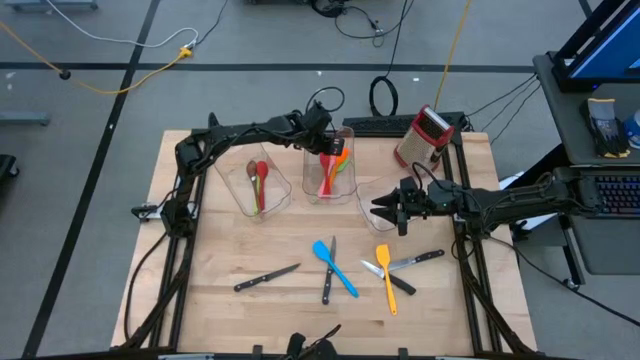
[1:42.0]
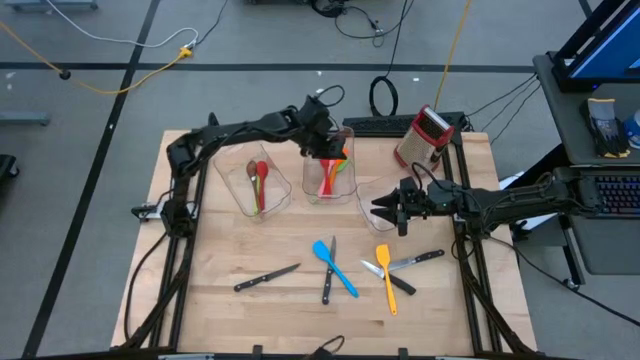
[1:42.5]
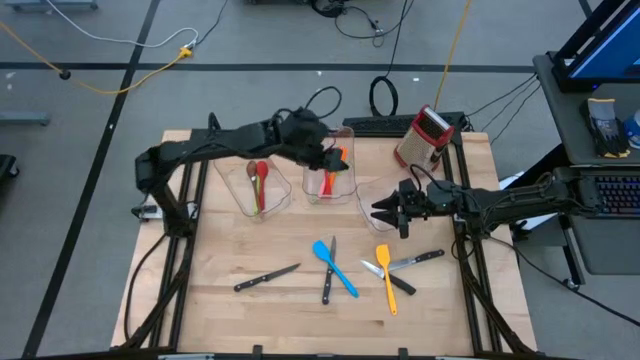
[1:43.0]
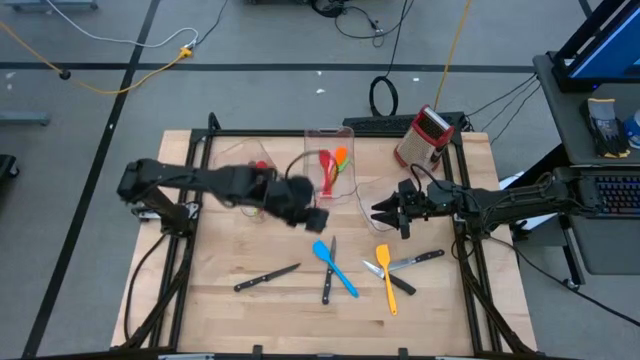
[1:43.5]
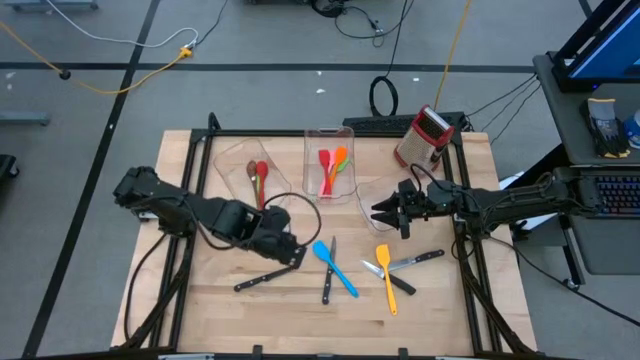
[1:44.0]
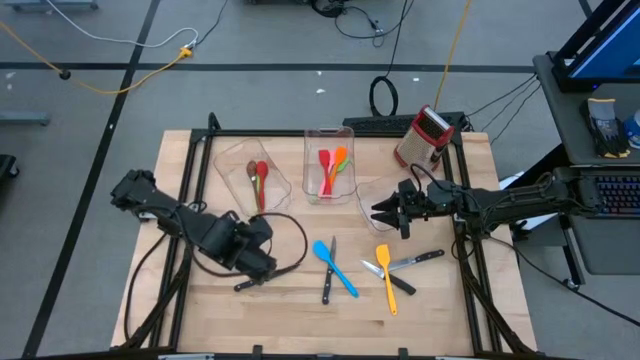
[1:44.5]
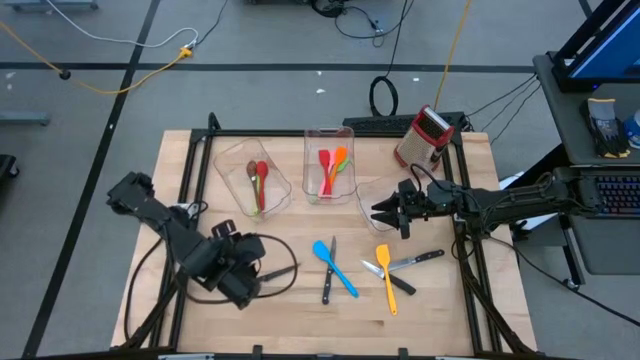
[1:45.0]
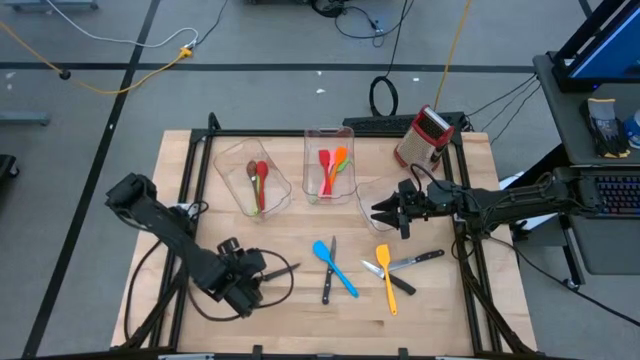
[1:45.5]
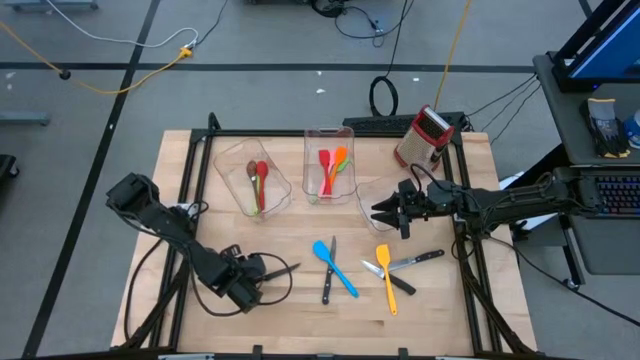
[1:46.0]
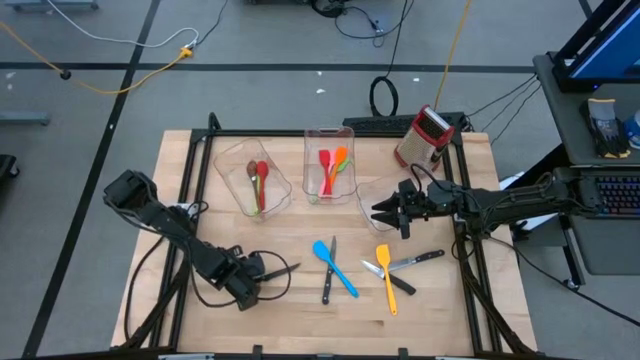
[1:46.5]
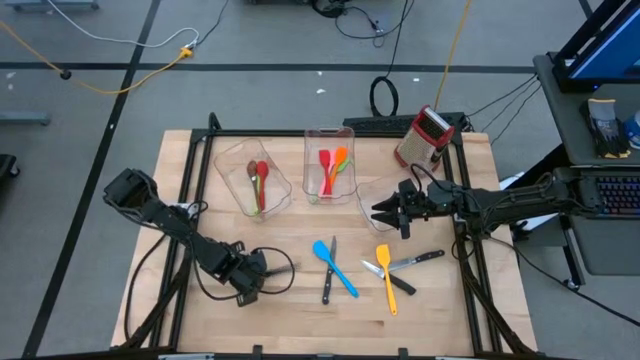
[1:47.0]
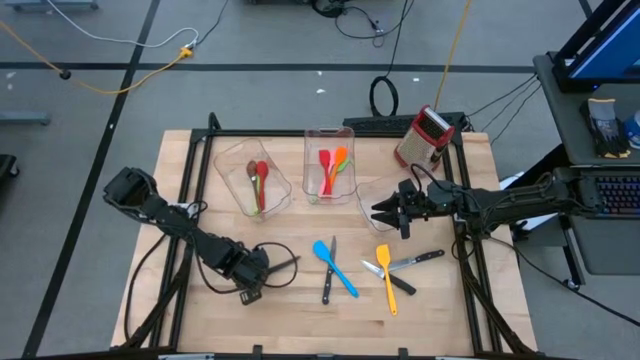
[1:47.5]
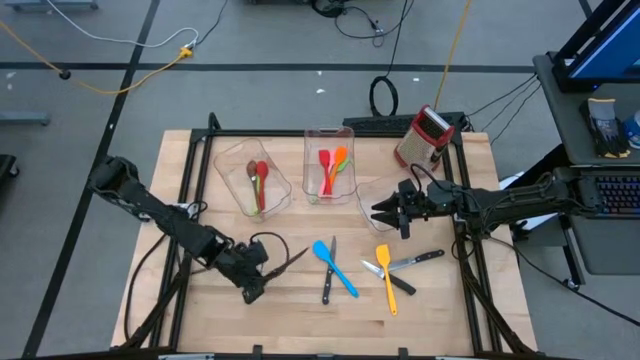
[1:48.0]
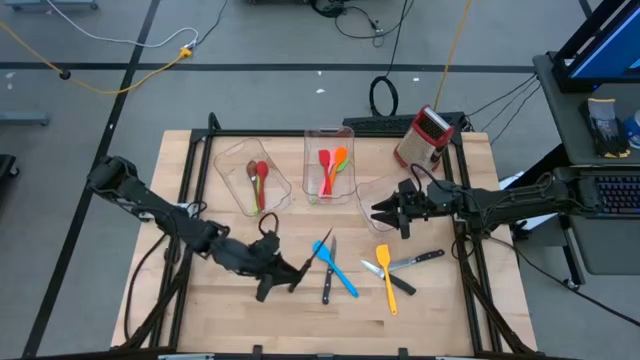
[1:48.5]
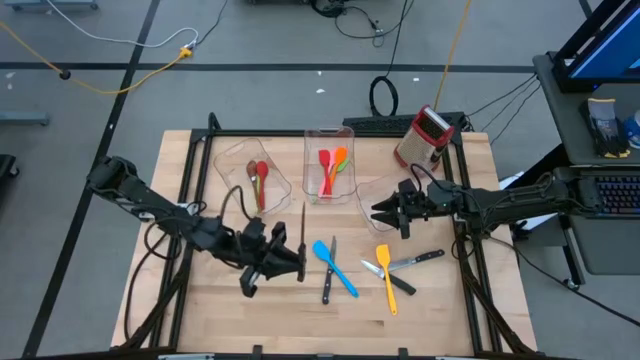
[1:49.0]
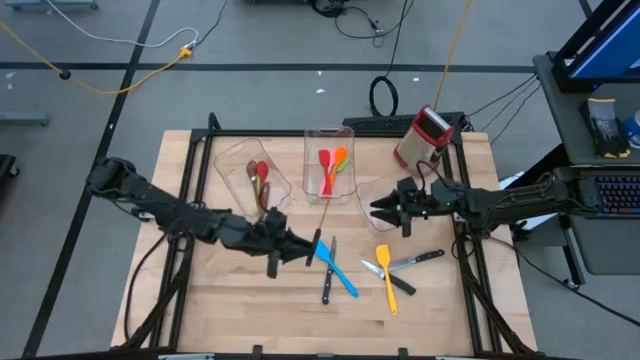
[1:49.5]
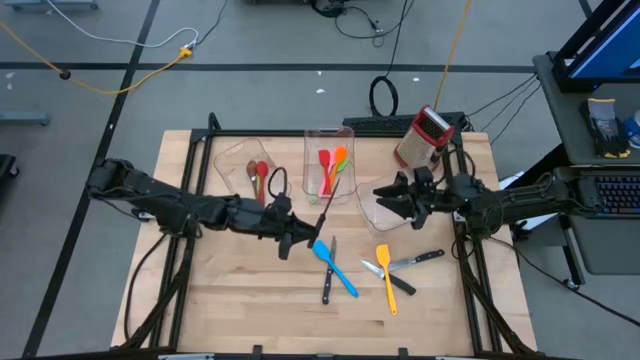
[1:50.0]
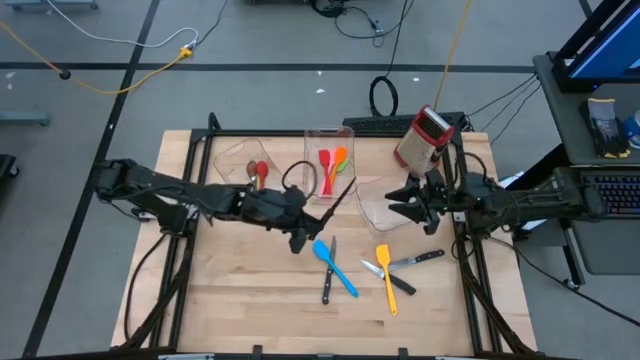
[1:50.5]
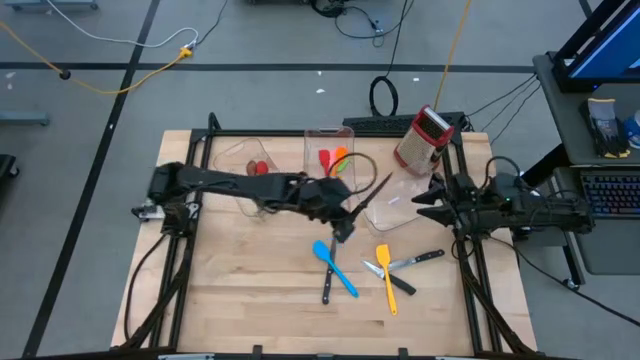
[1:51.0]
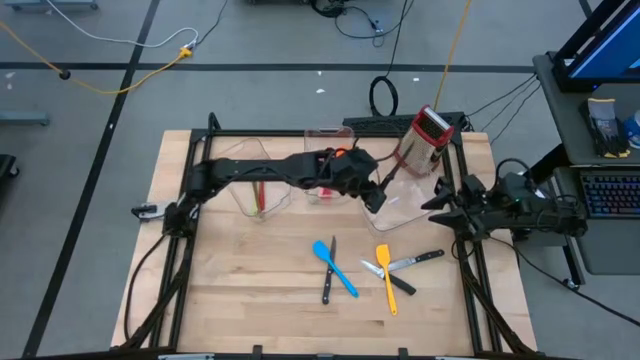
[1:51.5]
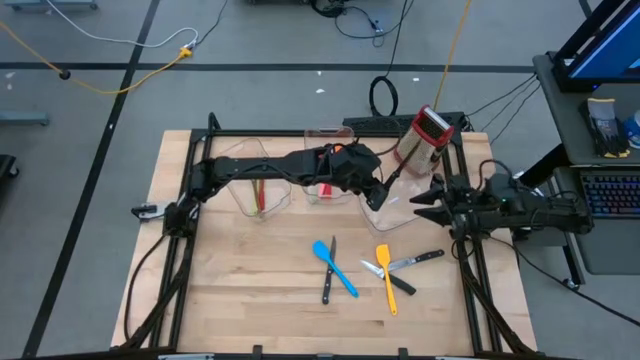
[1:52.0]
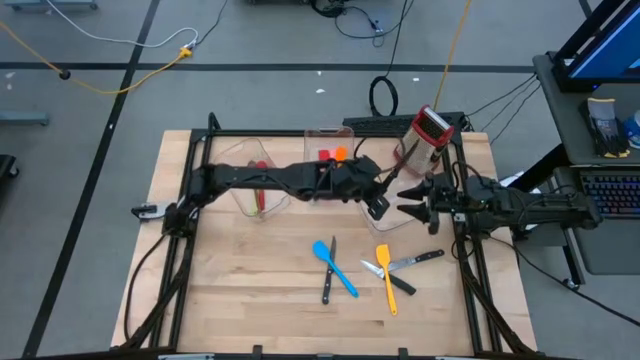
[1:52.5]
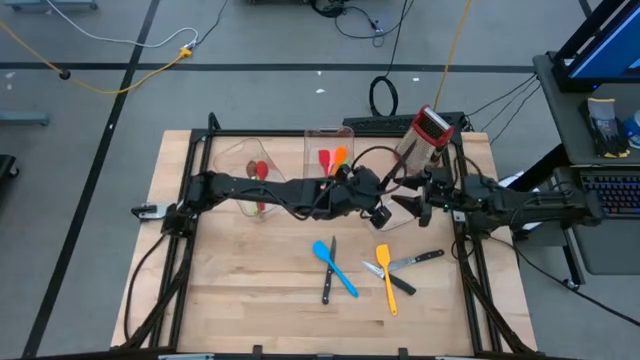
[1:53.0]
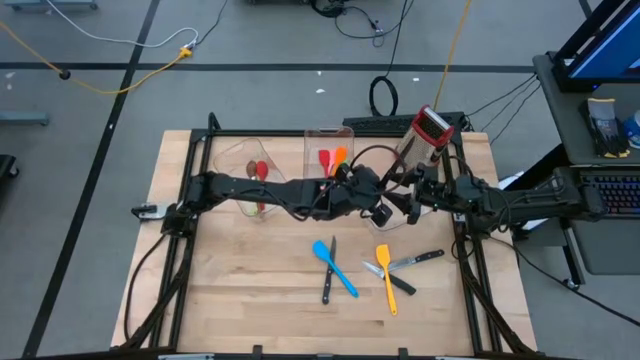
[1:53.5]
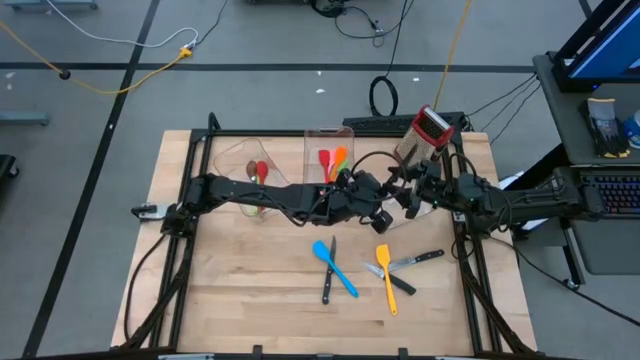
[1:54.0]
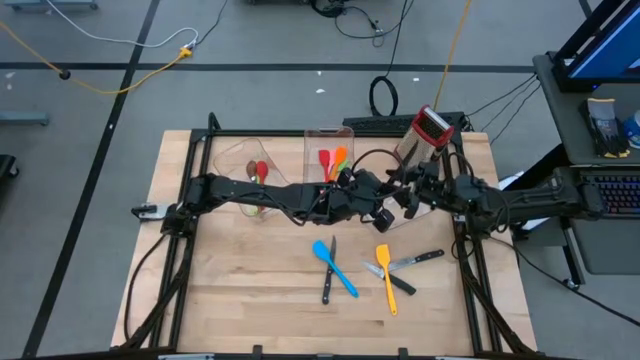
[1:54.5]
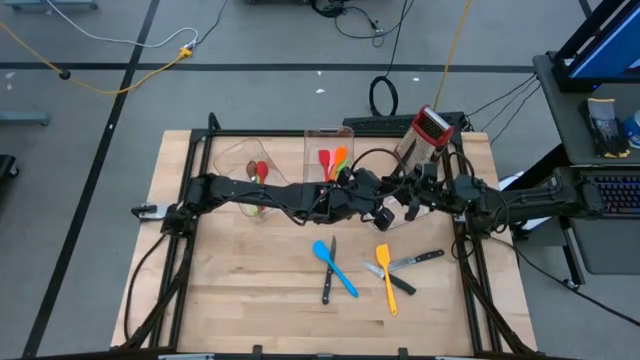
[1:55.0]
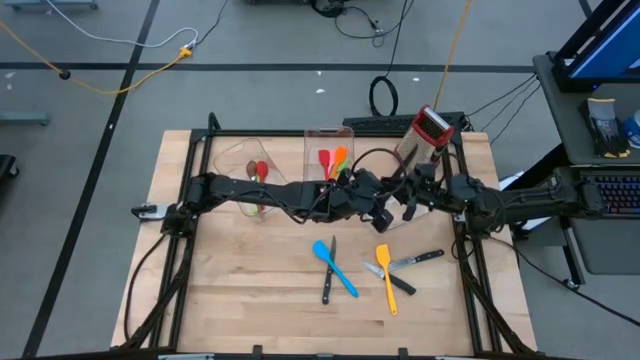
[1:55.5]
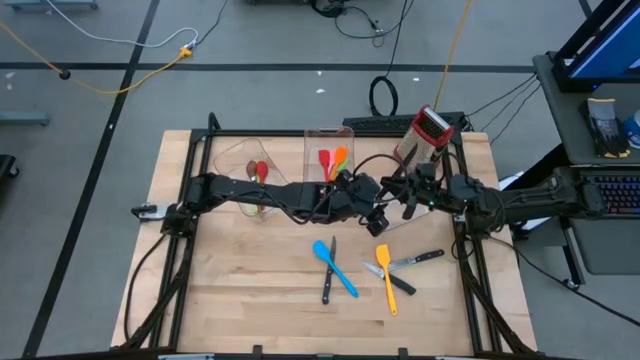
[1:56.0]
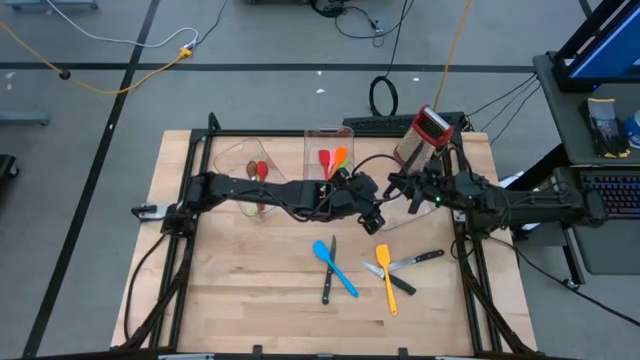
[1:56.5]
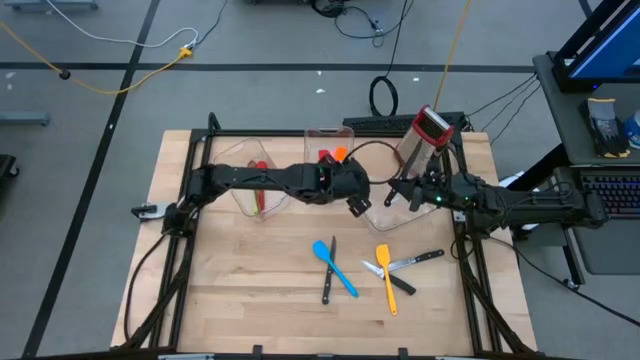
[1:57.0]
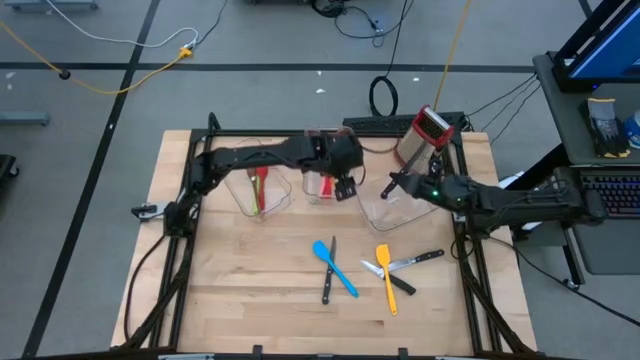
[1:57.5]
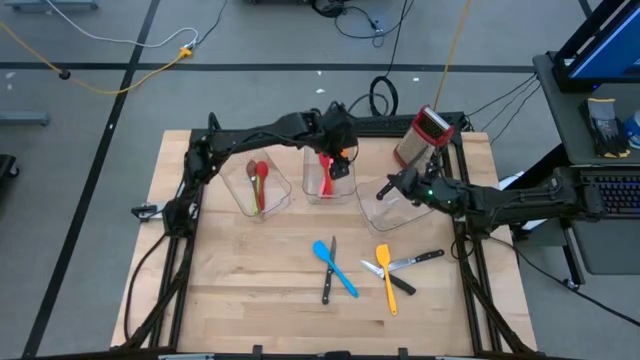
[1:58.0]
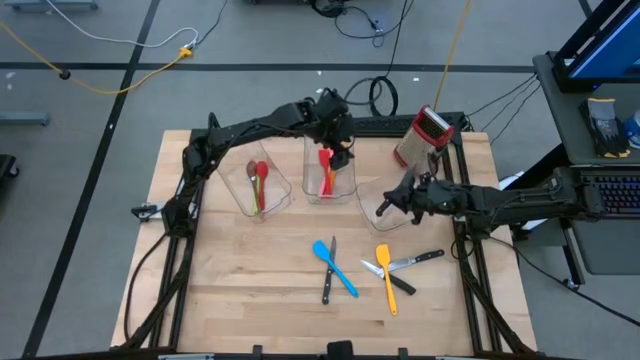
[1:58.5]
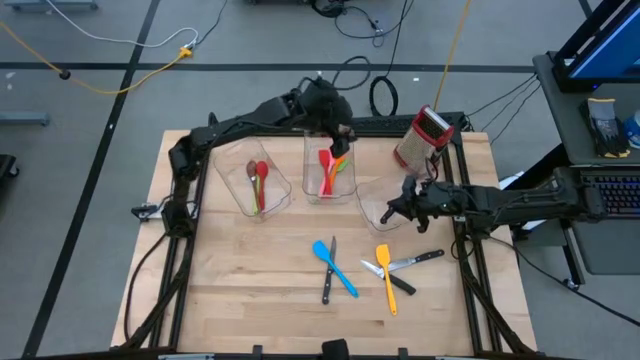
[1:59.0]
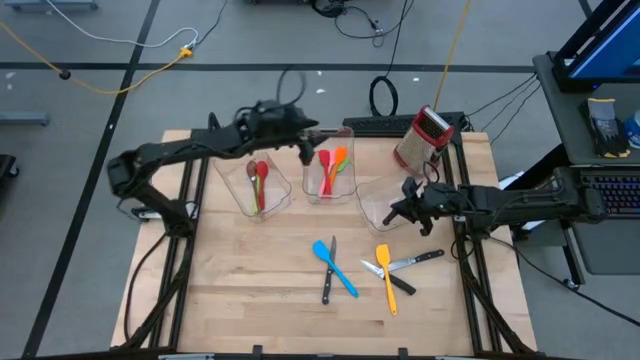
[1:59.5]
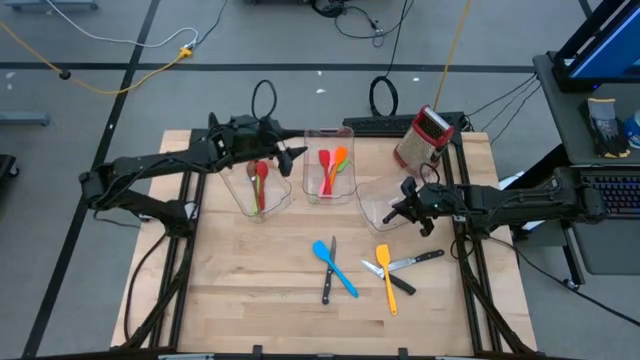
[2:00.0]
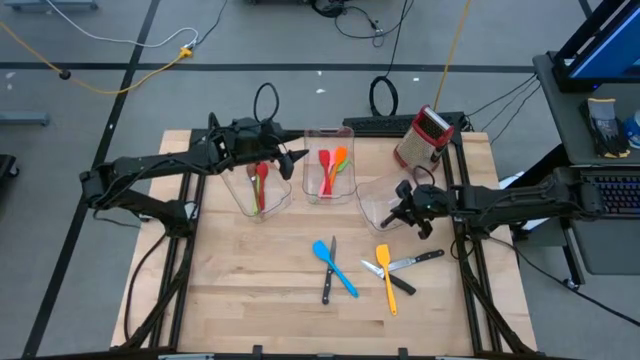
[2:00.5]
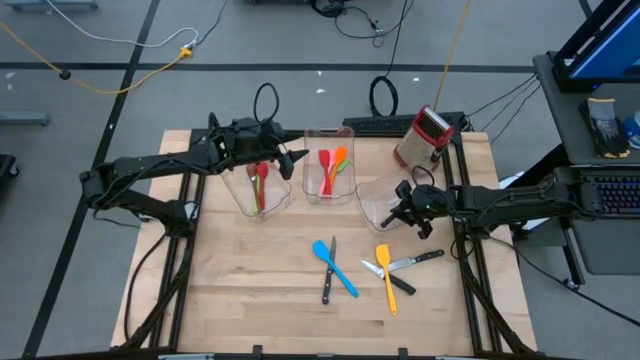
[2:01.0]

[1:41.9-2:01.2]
Task: Pick & Place Kitchen Items
Put the black kitchen knife into the right bin

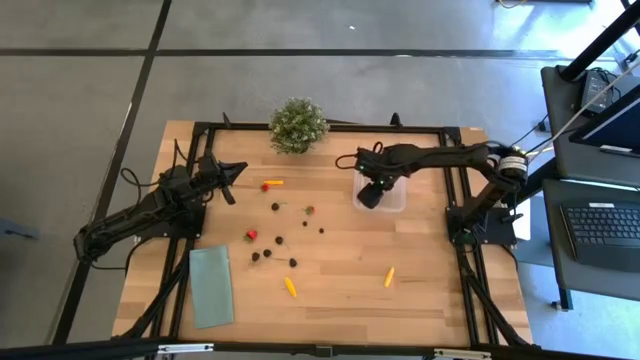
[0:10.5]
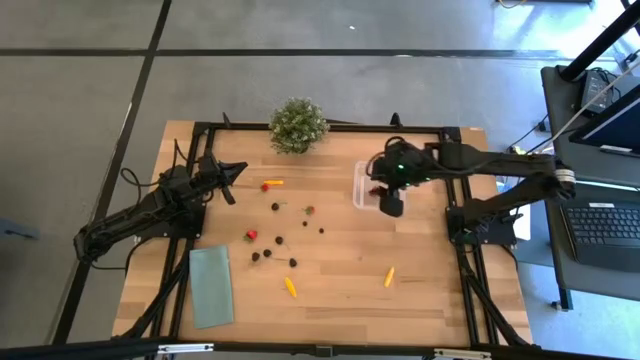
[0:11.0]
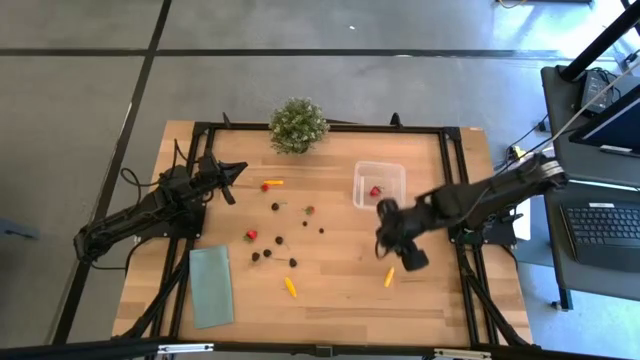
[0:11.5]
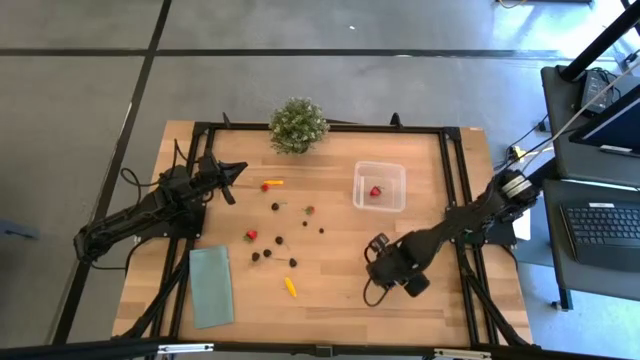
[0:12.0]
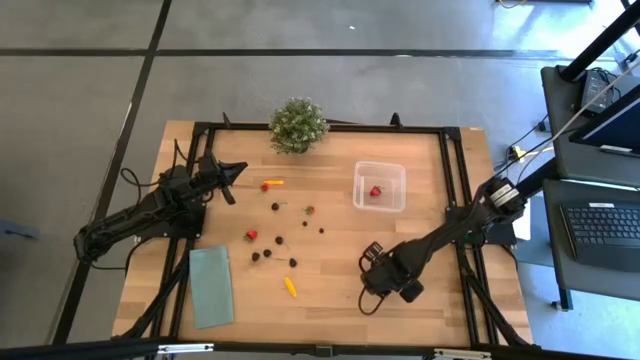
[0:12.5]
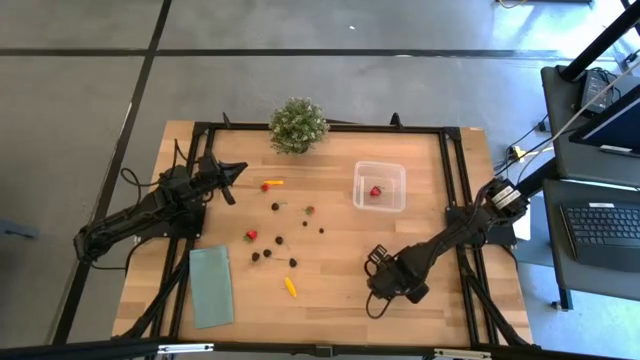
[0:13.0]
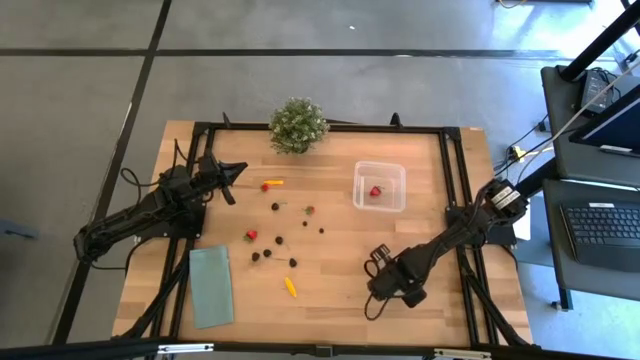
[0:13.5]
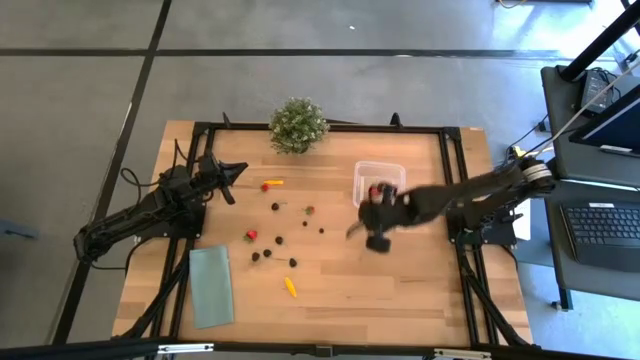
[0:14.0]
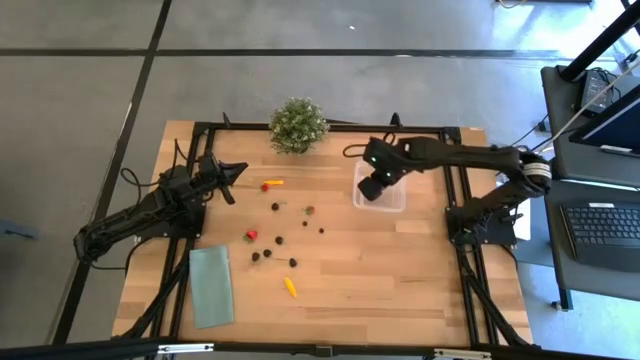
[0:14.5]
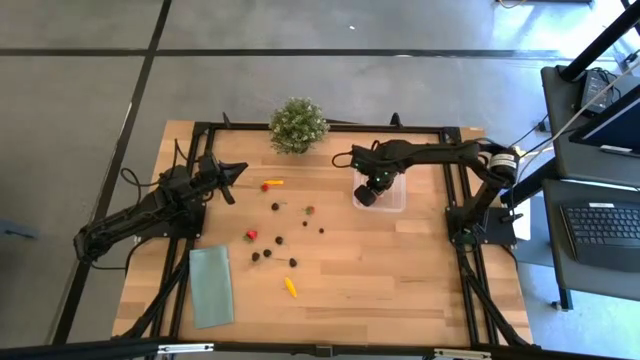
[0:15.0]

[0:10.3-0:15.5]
Task: Pick and placing Produce into tupperware
Put the right sweet corn into the transparent bin
